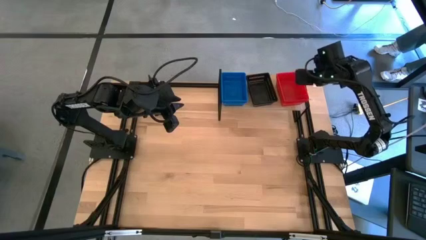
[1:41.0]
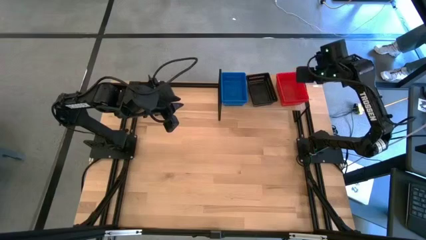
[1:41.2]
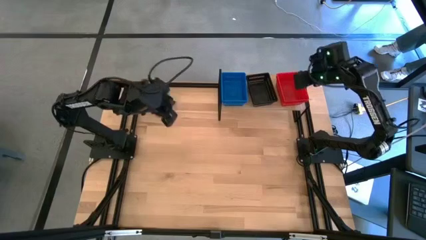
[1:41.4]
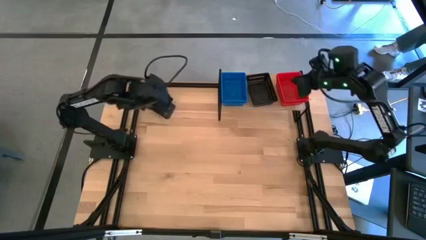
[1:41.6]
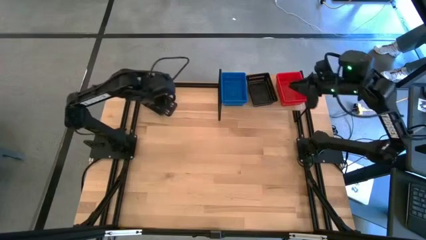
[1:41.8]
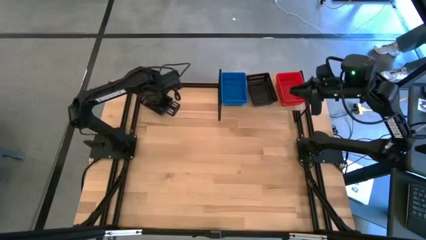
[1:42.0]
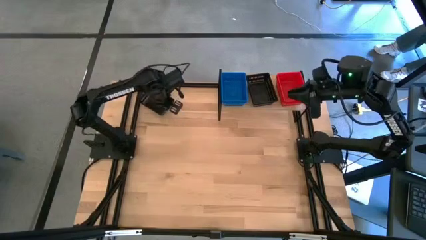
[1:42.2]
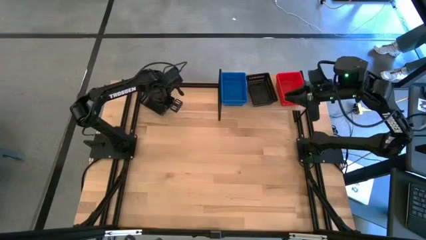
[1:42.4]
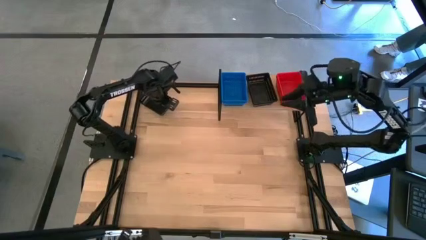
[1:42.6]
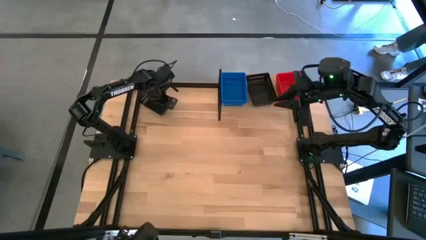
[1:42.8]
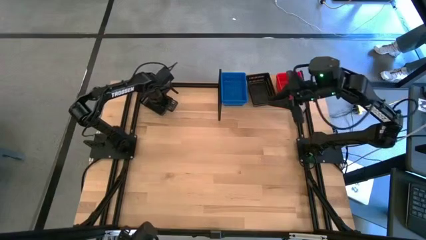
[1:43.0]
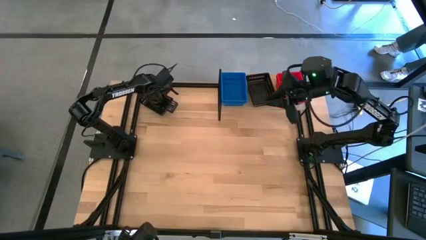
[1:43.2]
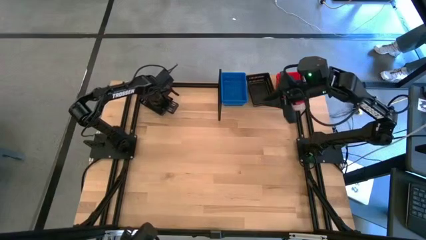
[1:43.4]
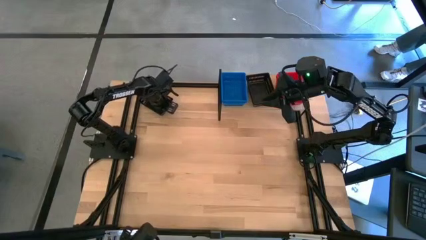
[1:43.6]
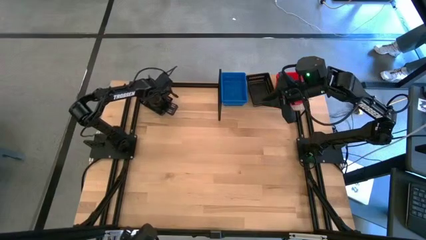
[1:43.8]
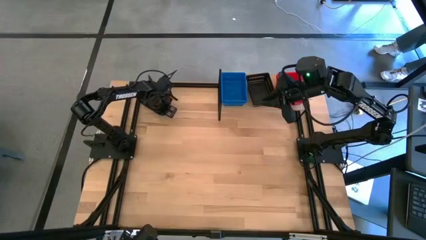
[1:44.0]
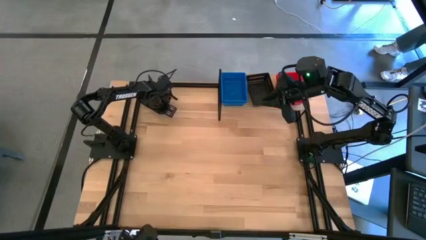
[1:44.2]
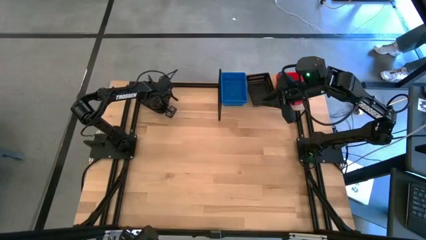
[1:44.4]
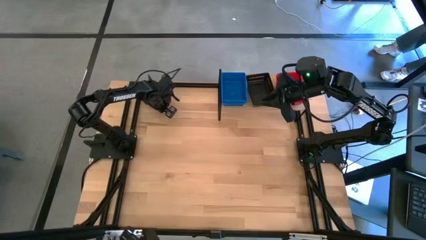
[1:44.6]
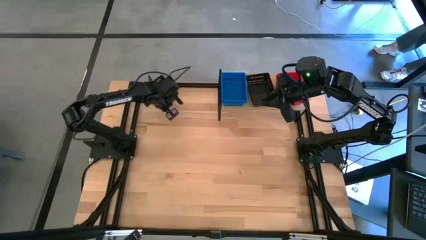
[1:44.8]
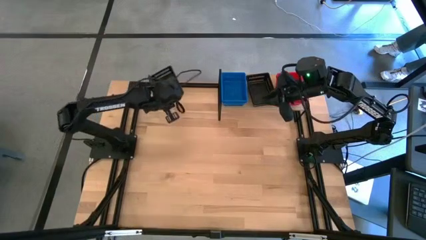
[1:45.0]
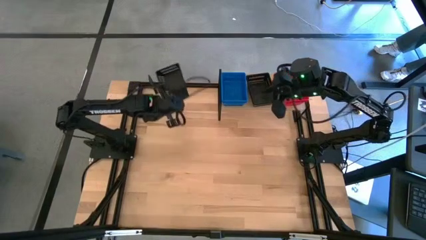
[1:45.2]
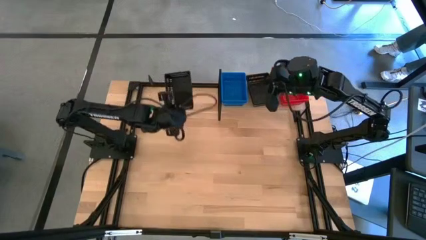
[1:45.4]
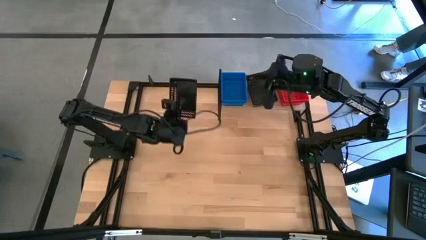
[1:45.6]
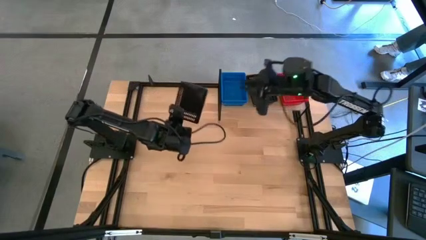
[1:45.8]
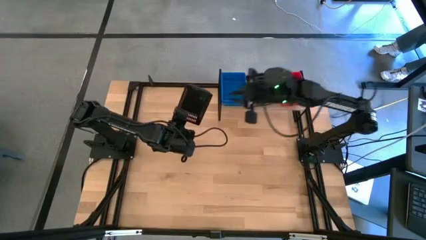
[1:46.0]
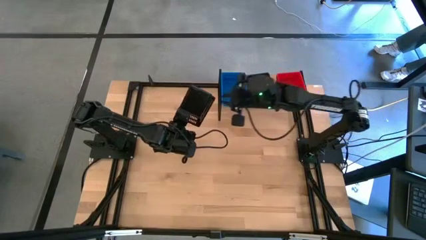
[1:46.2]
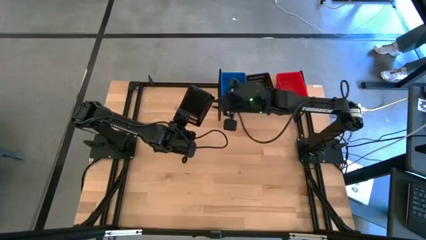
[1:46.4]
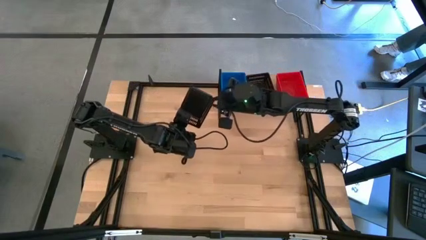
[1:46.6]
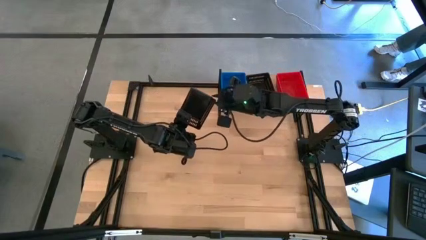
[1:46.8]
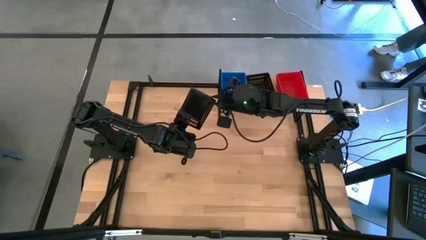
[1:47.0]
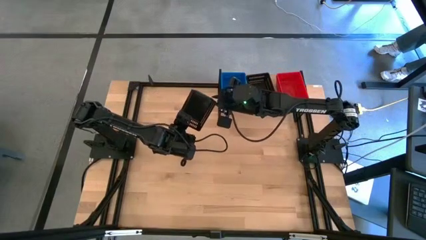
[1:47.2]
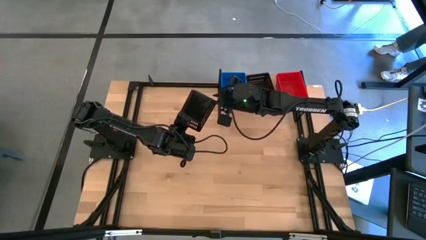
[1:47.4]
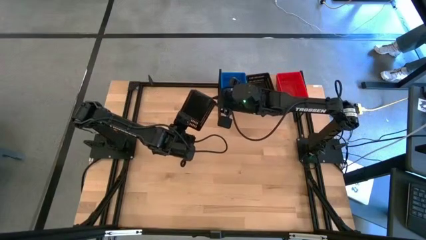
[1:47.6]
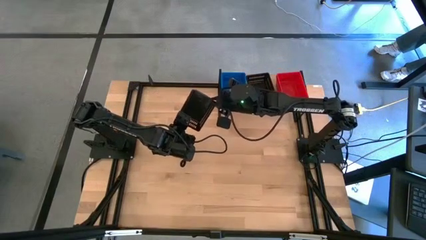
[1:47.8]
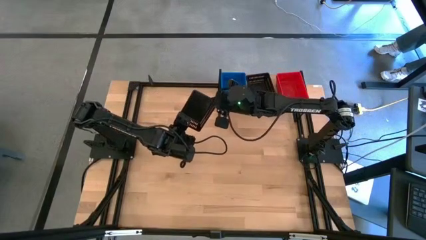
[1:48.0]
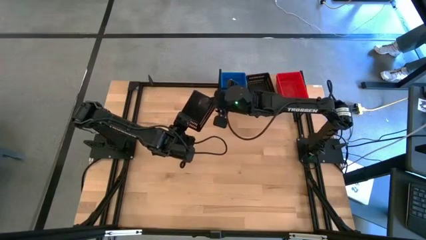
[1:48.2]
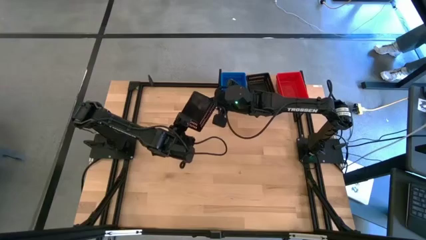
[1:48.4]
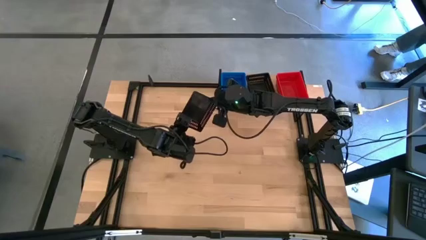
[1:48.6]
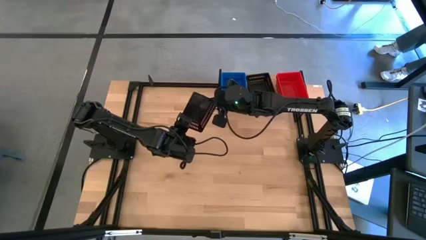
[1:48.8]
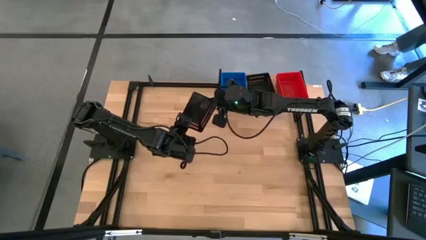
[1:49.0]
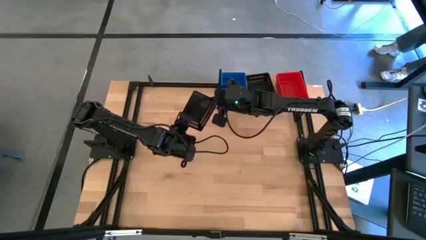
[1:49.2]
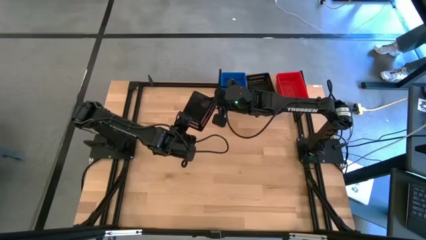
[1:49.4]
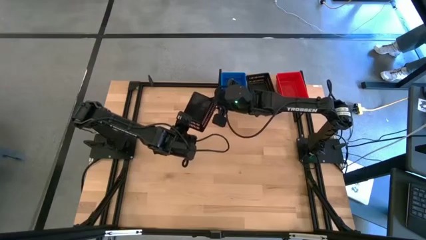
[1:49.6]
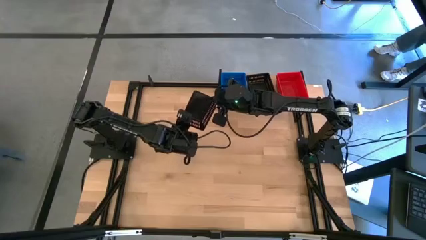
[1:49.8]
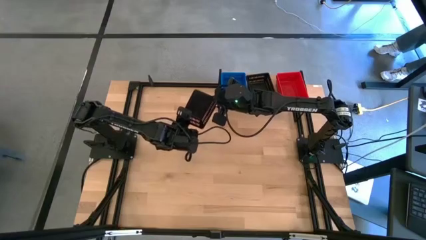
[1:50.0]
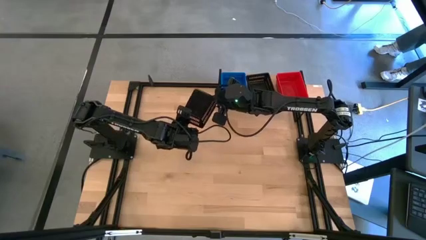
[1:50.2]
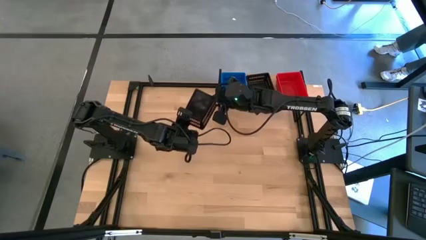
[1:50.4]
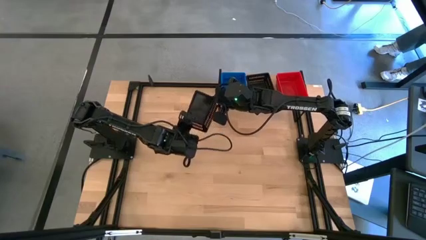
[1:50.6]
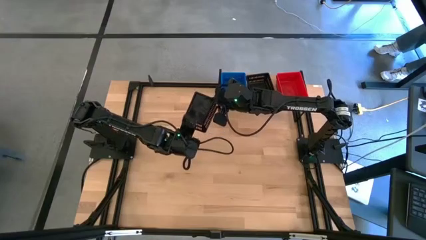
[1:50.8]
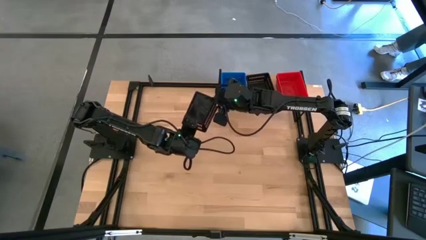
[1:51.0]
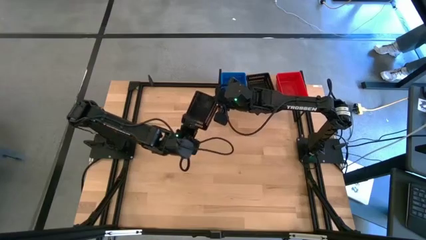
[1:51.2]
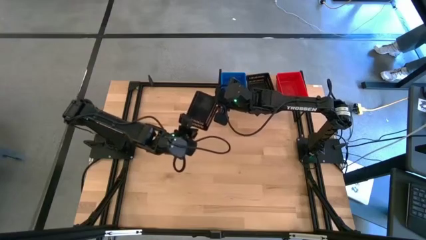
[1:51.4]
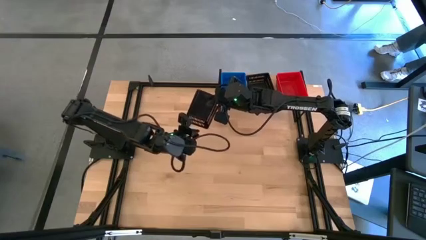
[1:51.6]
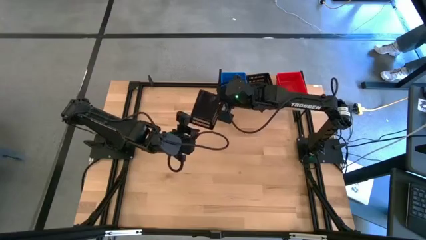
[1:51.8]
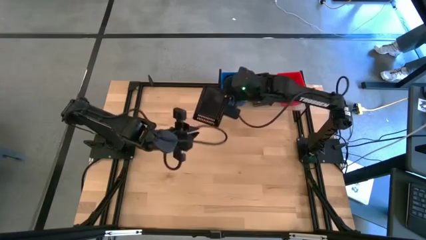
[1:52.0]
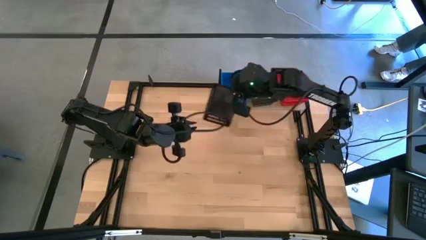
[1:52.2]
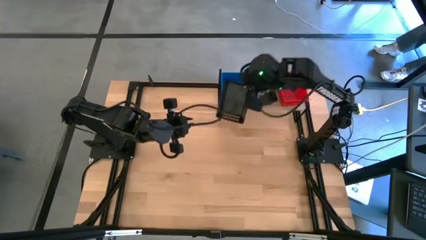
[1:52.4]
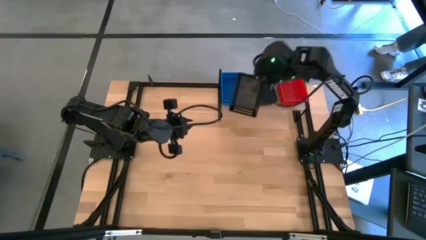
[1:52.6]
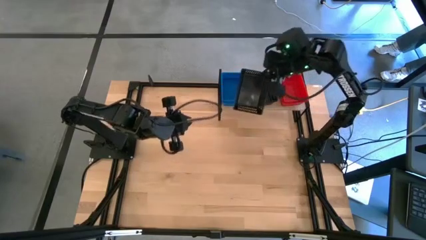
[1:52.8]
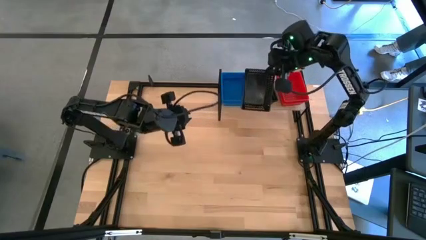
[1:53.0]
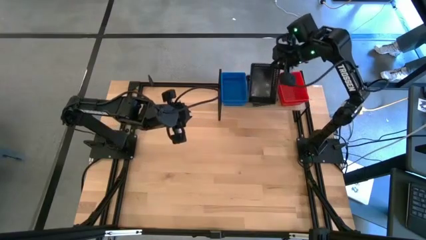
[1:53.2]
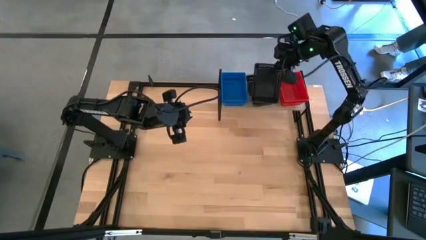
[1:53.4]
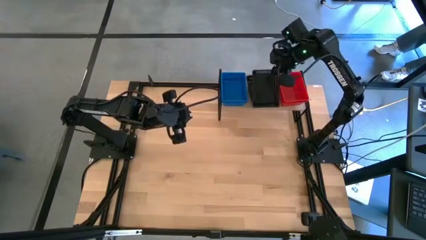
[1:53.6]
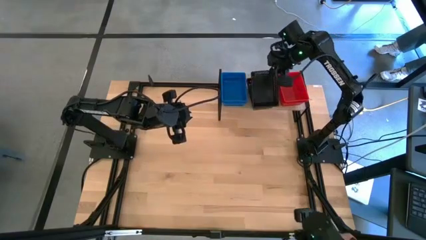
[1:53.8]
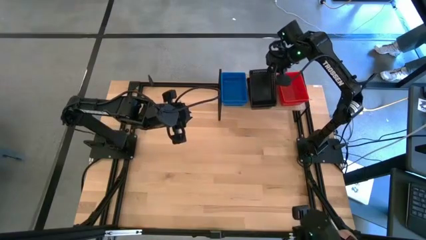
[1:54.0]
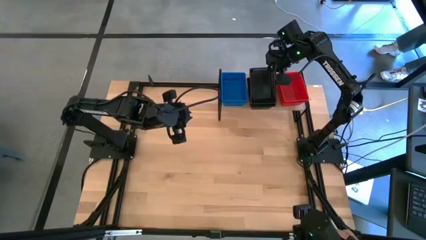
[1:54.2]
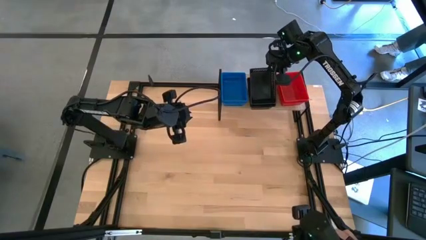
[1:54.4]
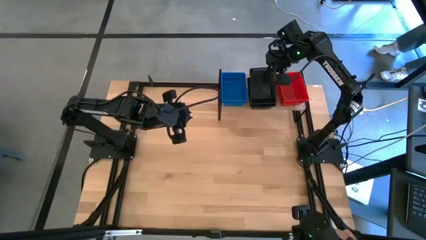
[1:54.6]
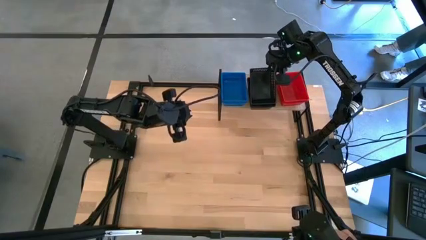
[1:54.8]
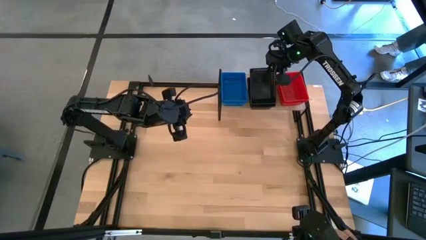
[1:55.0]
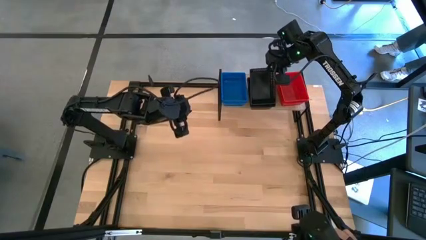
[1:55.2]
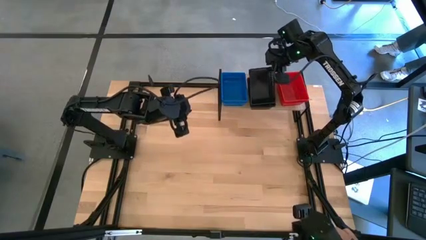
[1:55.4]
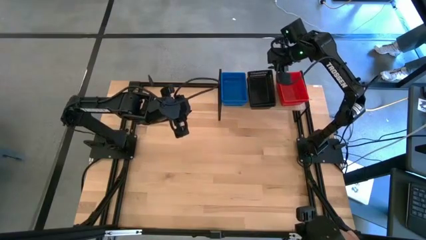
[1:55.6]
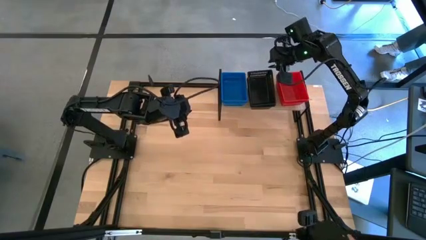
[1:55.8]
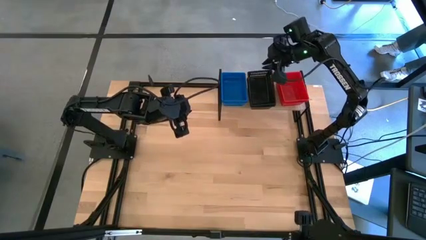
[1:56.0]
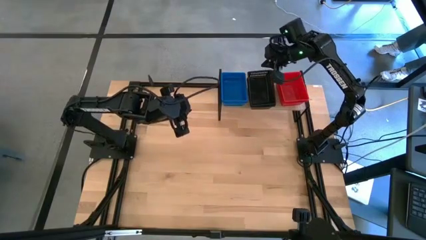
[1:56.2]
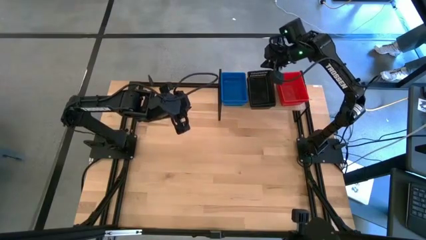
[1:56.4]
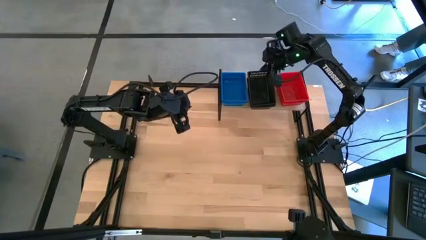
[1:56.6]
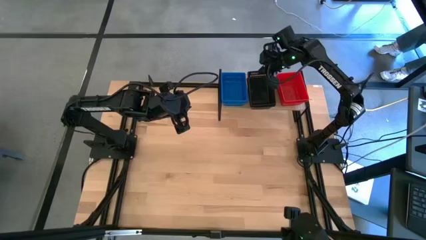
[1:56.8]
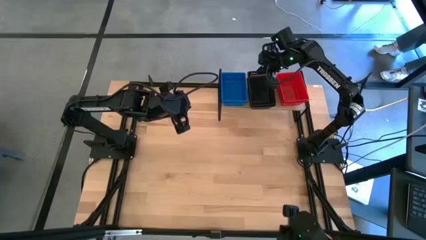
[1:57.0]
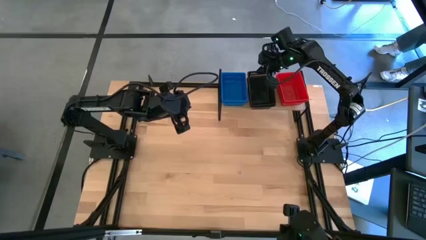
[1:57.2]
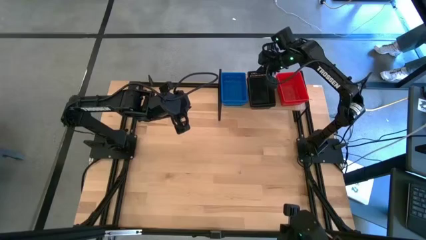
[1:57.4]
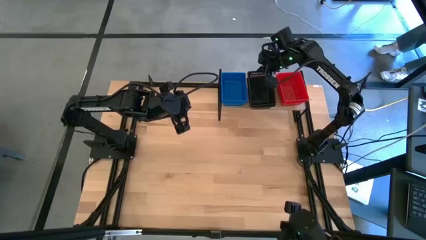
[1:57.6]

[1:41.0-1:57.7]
Task: Stack baskets on shelf by color
Stack the black bin on the black bin on the shelf
